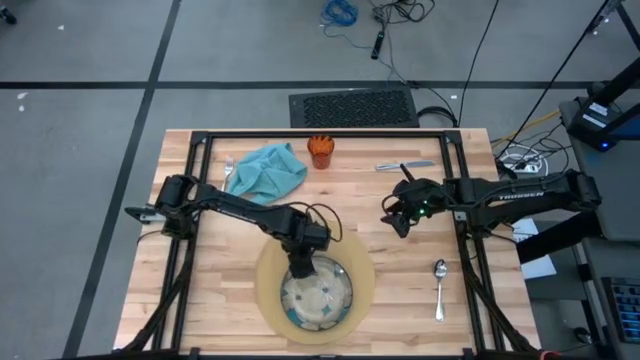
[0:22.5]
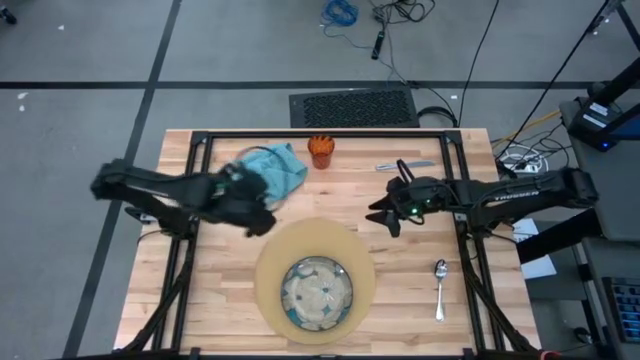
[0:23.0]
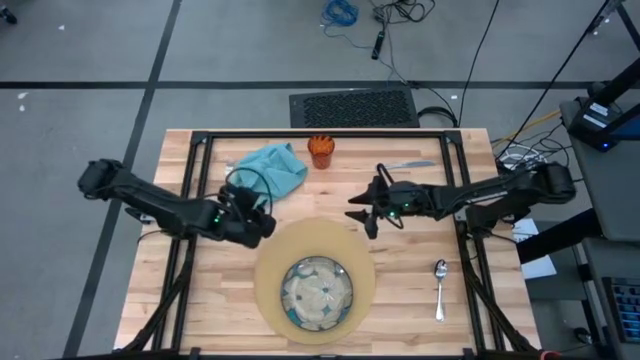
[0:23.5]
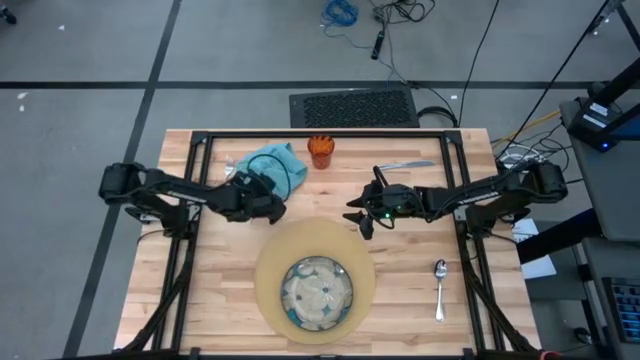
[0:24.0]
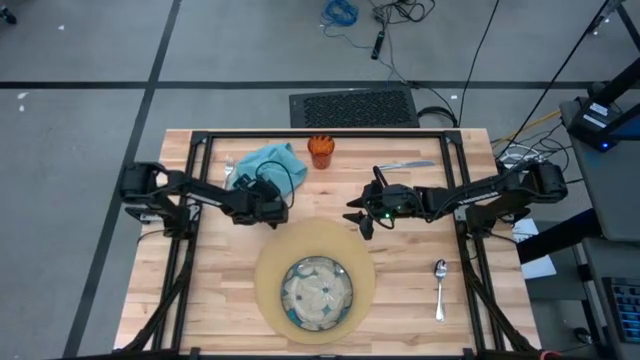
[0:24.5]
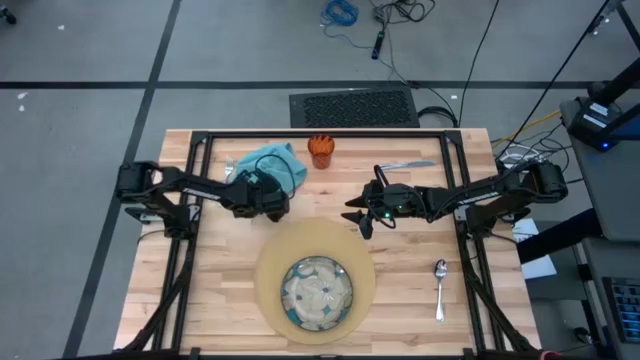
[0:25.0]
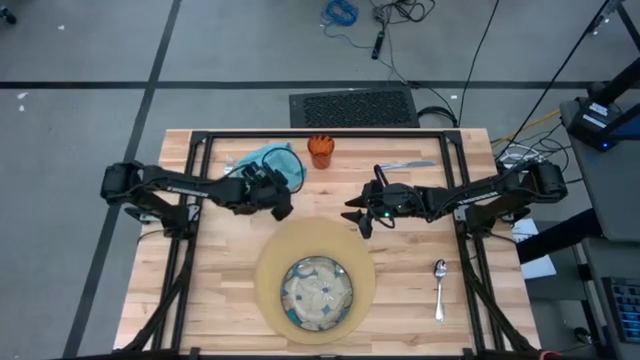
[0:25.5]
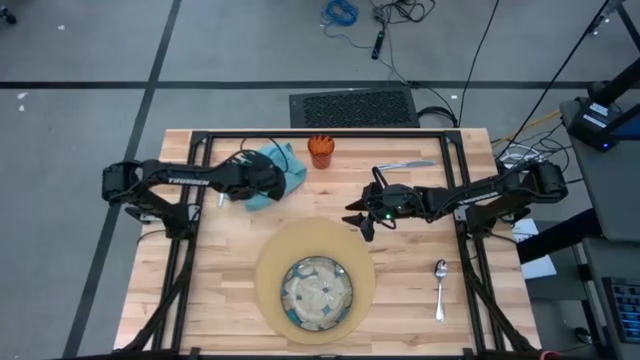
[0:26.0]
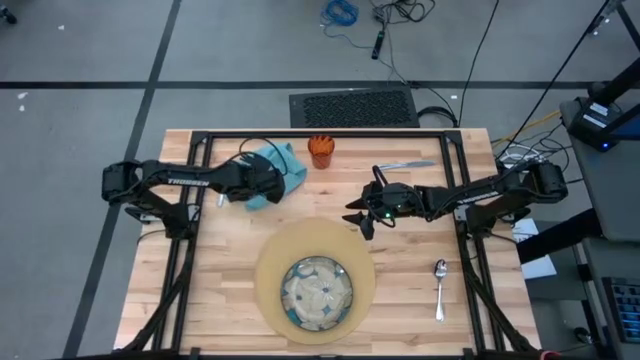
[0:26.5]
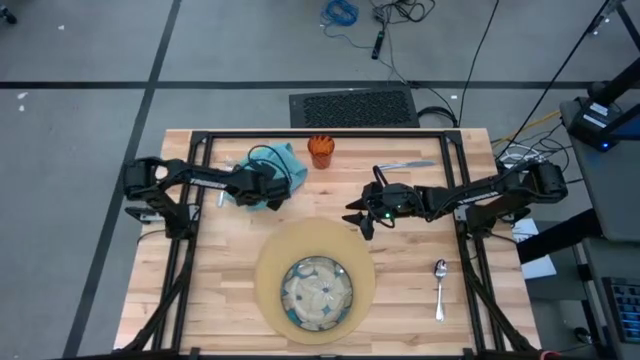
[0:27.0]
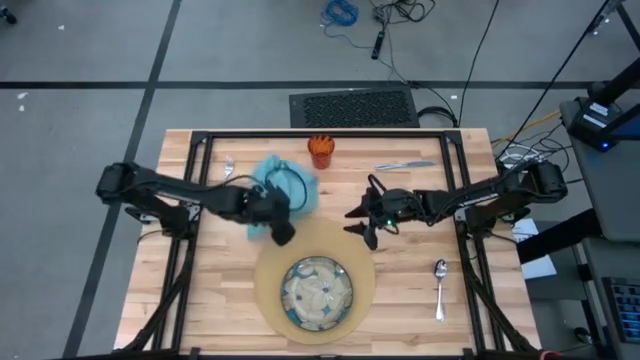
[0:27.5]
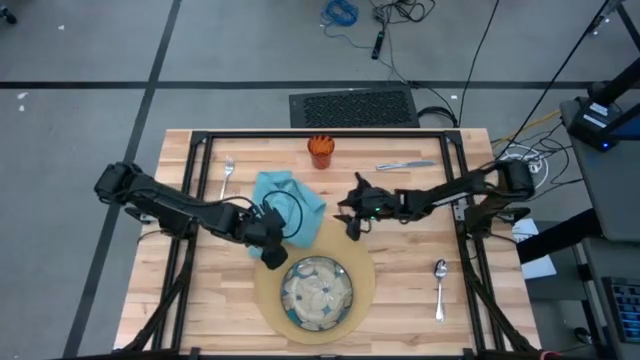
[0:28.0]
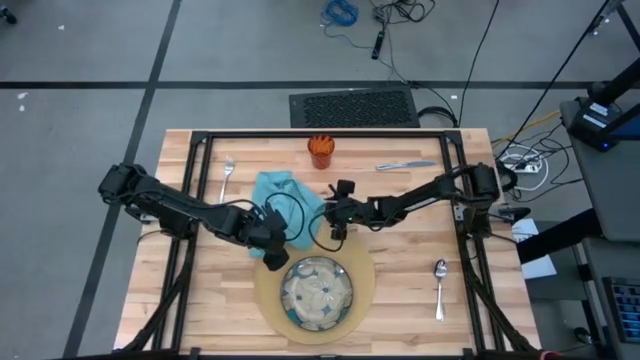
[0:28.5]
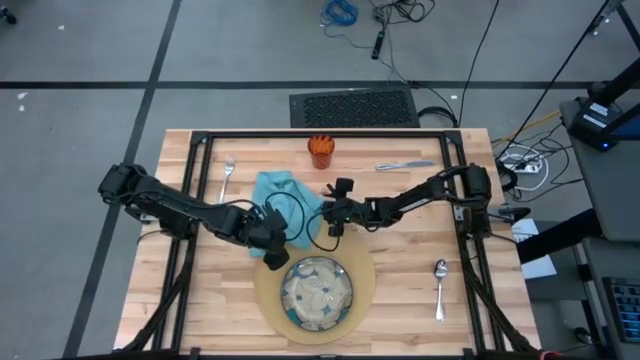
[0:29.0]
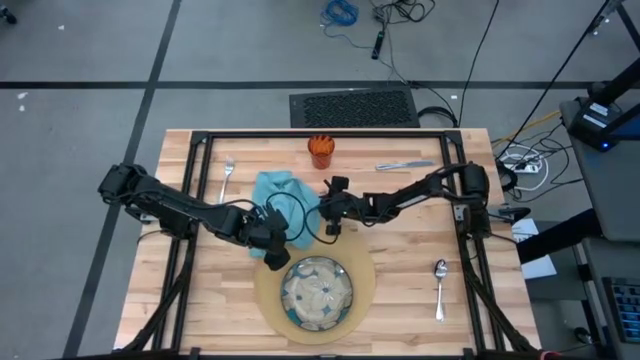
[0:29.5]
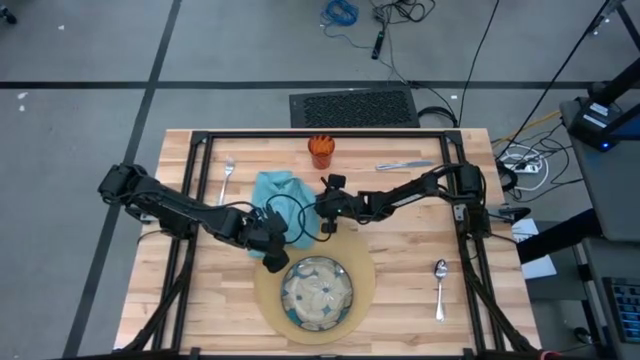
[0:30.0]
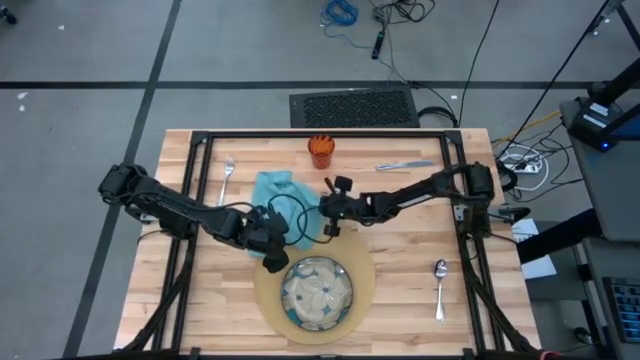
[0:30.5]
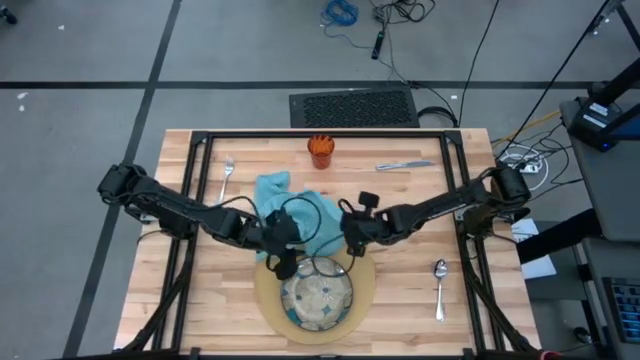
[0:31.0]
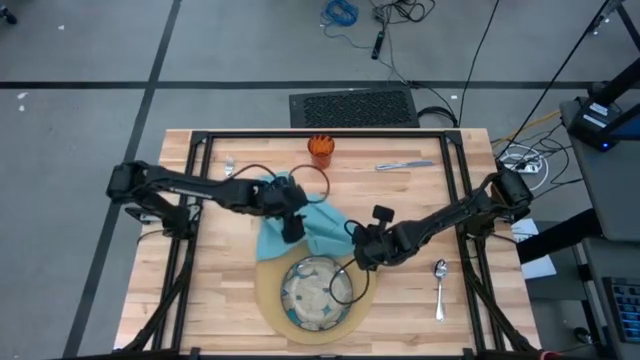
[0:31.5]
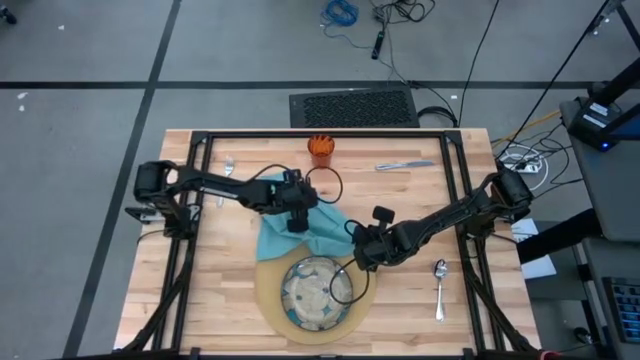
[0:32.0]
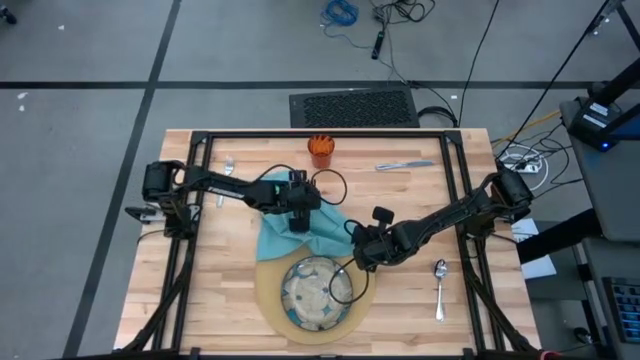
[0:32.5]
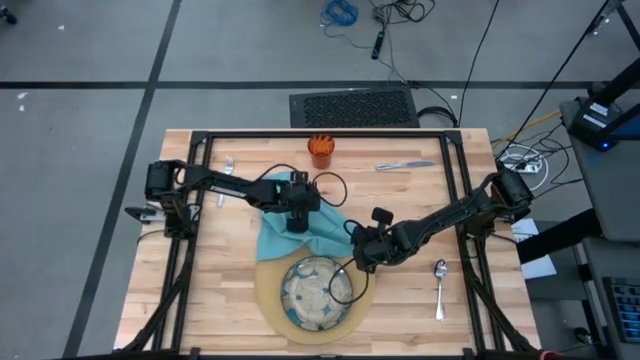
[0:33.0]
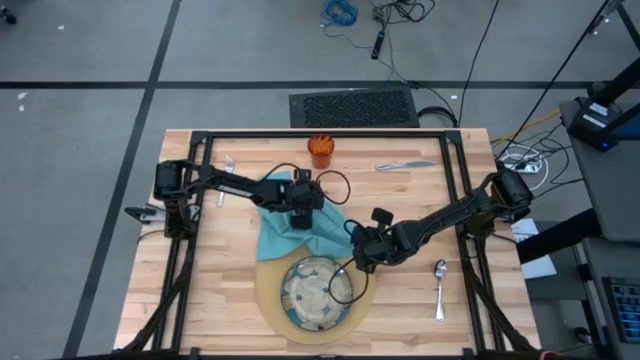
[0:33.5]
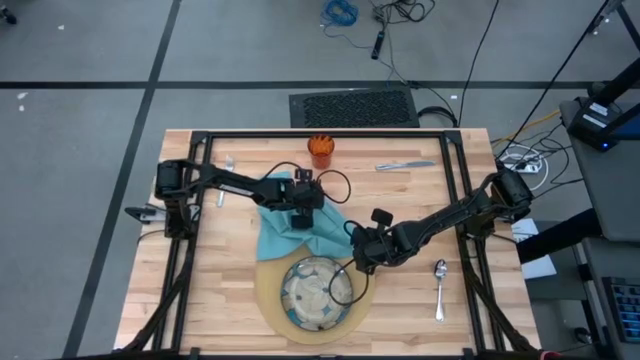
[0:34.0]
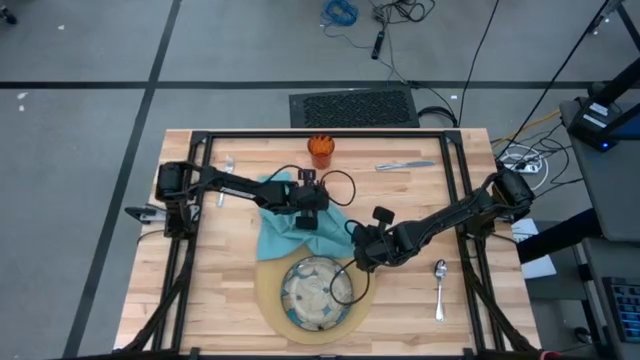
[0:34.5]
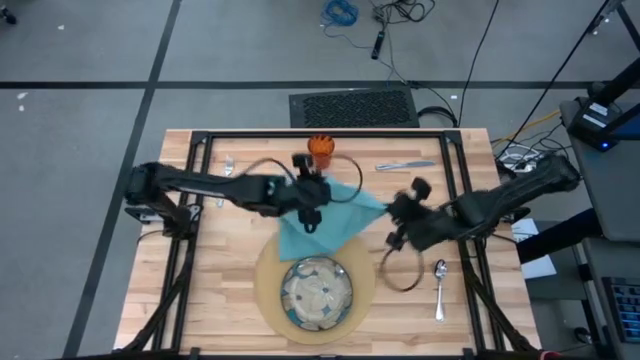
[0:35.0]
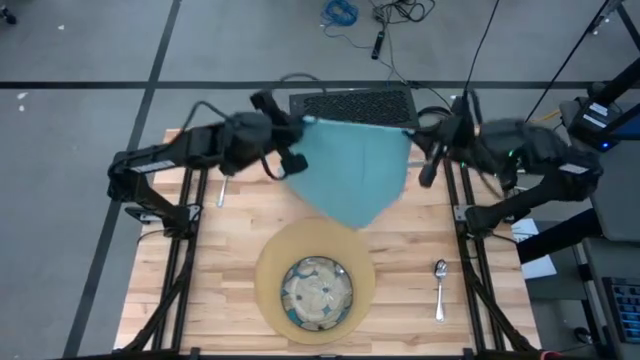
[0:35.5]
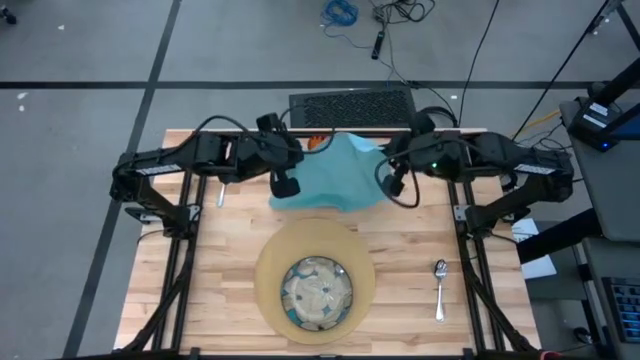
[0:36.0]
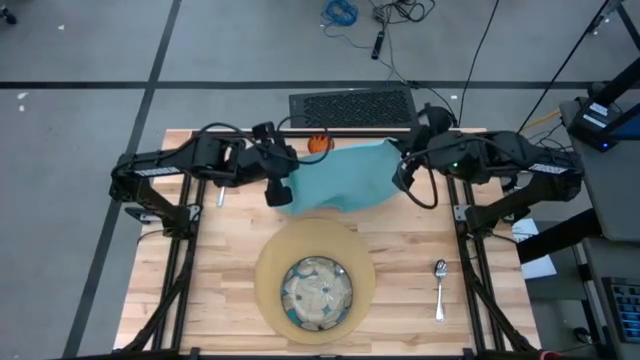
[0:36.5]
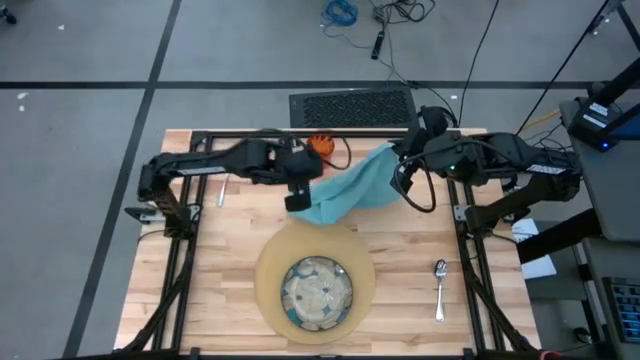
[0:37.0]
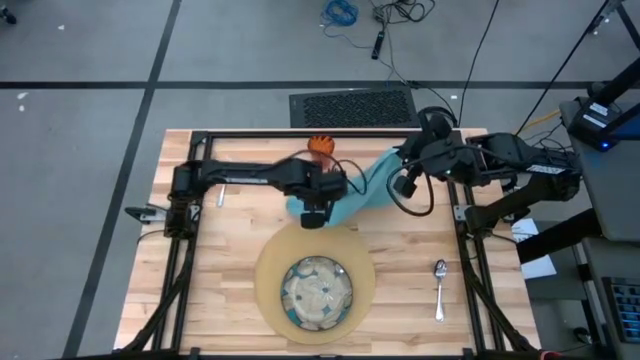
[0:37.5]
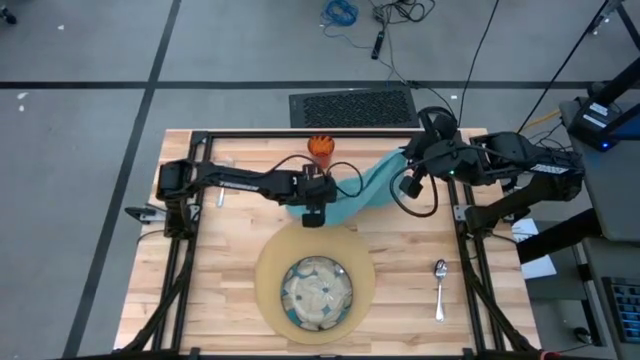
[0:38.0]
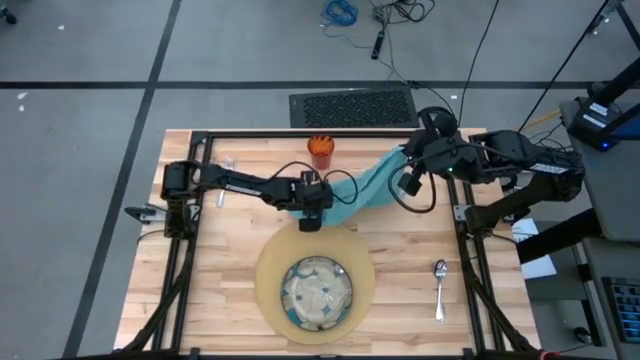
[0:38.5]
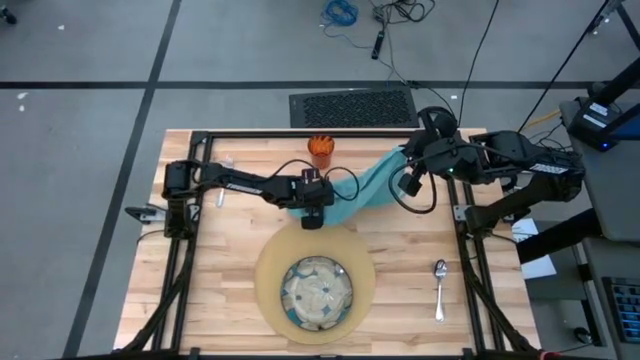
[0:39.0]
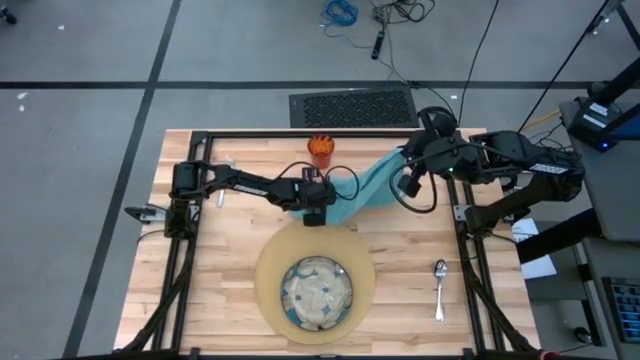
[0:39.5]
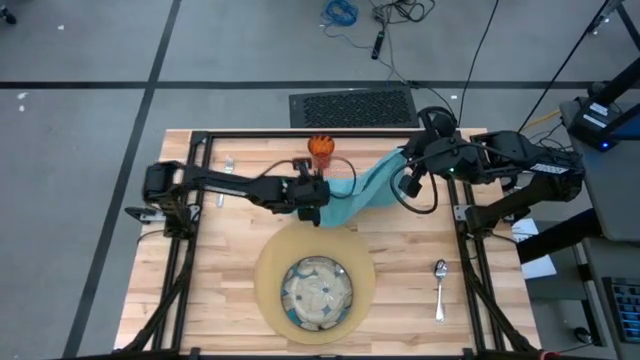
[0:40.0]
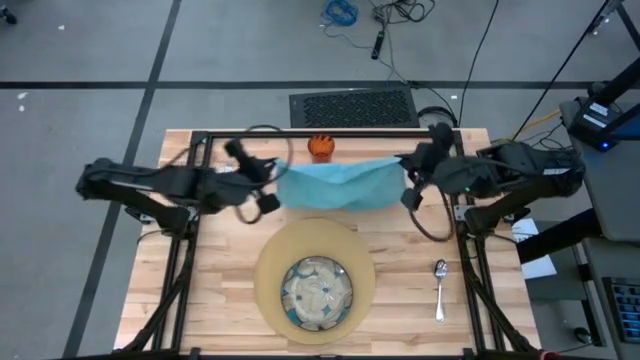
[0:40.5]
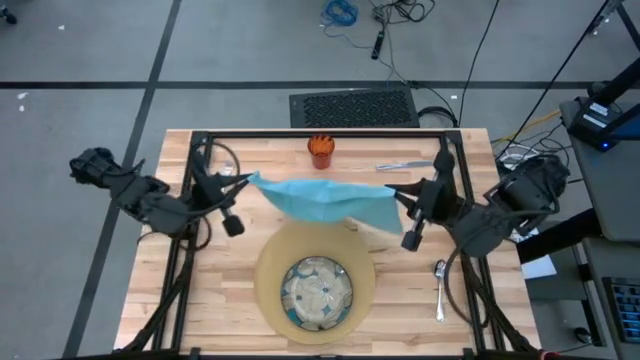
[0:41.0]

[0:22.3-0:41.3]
Task: Set table place
Fold the blue table napkin
